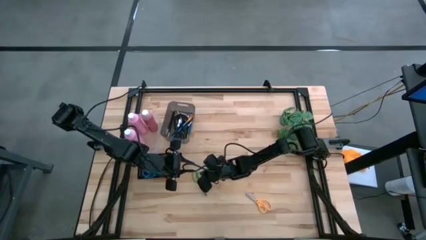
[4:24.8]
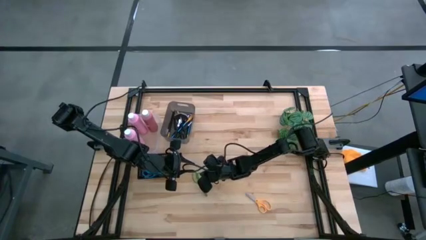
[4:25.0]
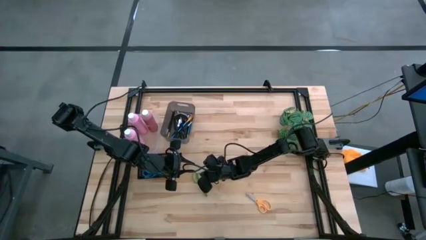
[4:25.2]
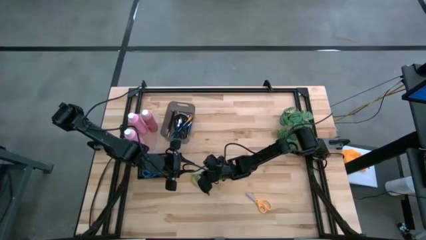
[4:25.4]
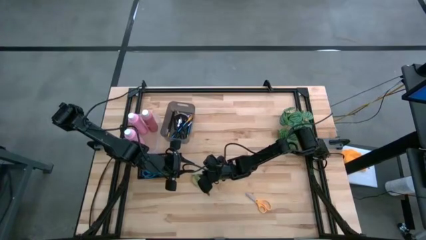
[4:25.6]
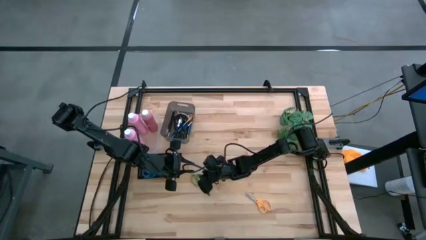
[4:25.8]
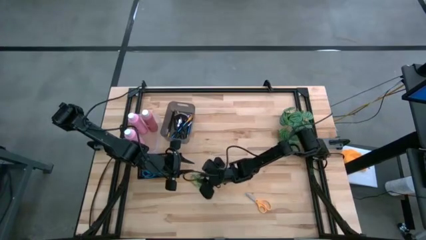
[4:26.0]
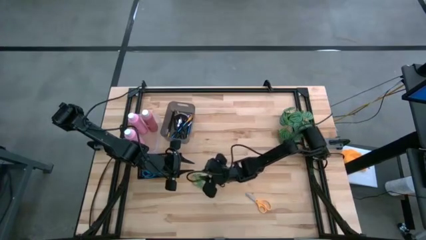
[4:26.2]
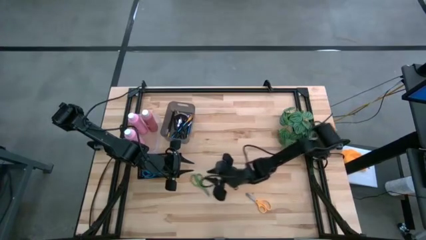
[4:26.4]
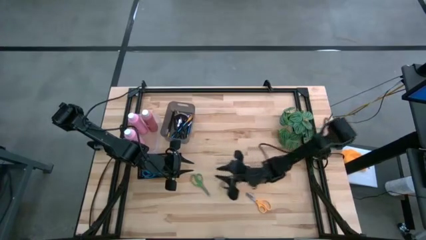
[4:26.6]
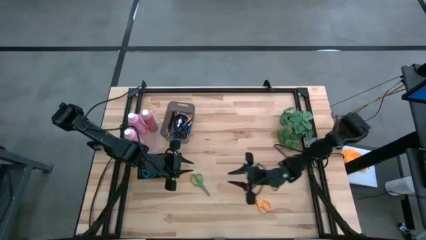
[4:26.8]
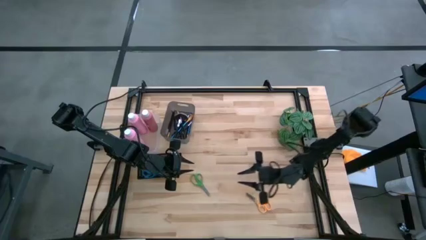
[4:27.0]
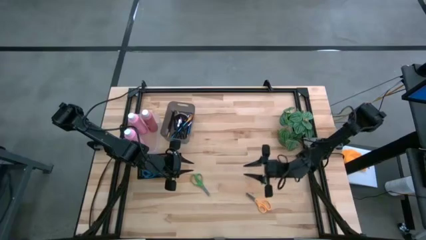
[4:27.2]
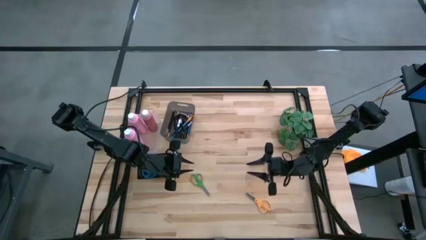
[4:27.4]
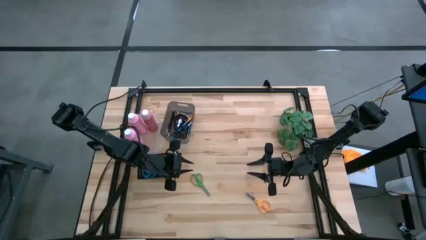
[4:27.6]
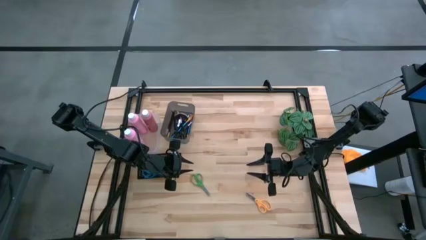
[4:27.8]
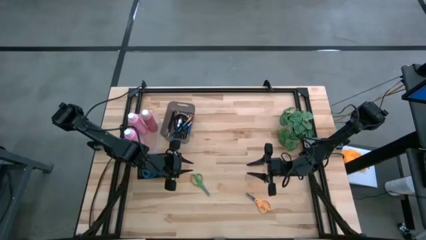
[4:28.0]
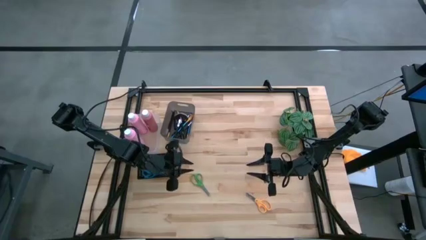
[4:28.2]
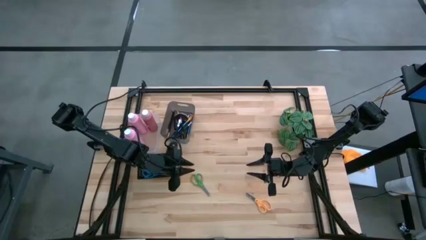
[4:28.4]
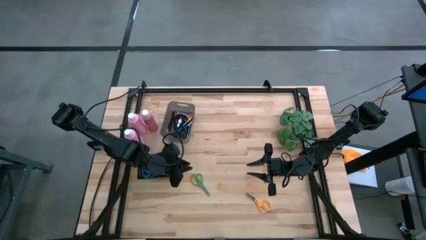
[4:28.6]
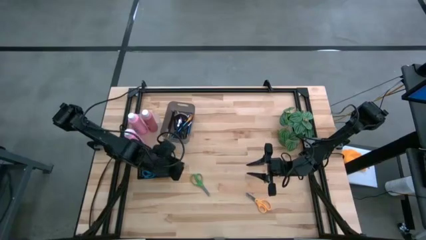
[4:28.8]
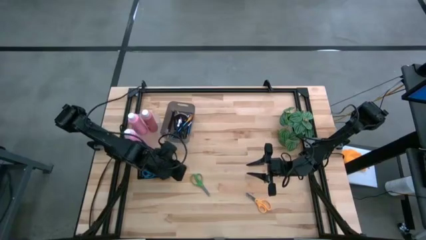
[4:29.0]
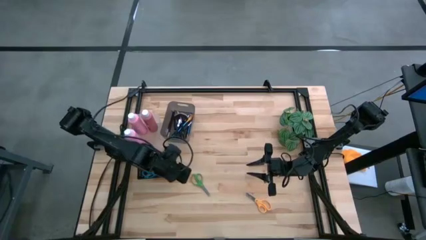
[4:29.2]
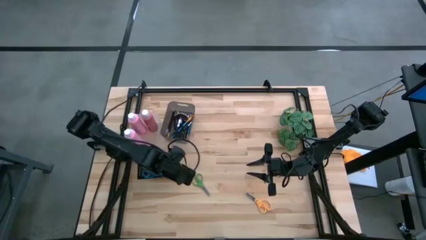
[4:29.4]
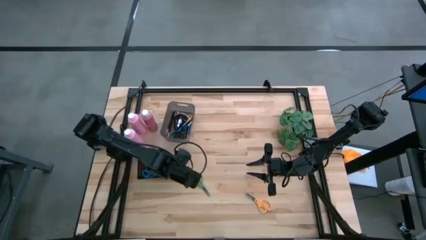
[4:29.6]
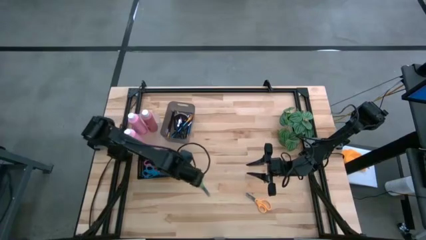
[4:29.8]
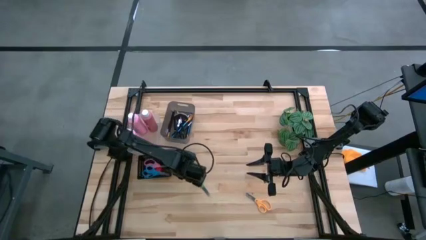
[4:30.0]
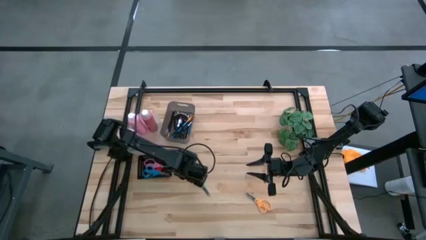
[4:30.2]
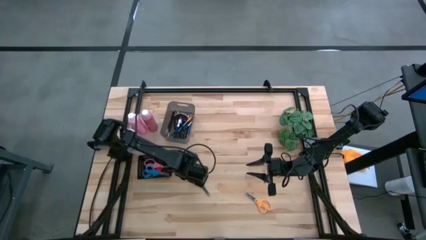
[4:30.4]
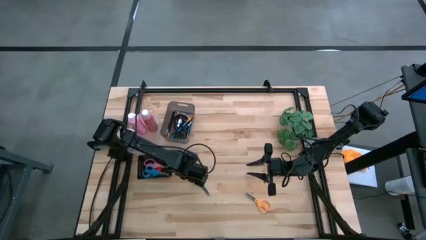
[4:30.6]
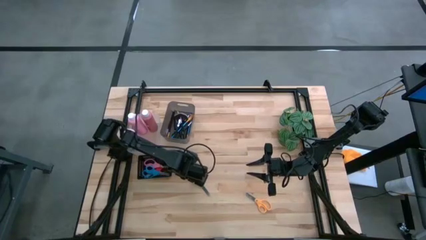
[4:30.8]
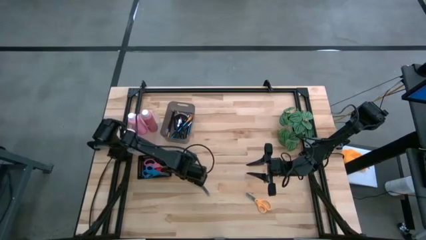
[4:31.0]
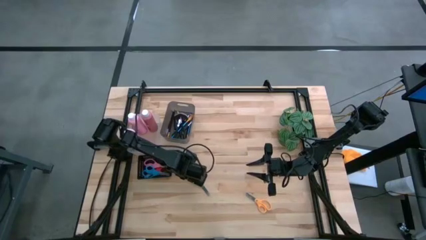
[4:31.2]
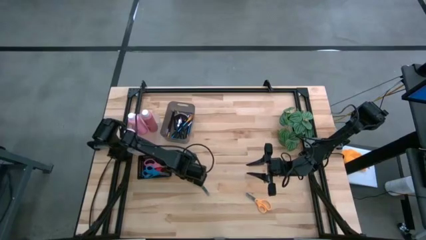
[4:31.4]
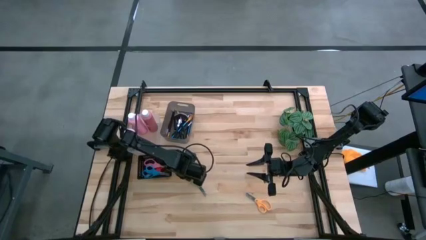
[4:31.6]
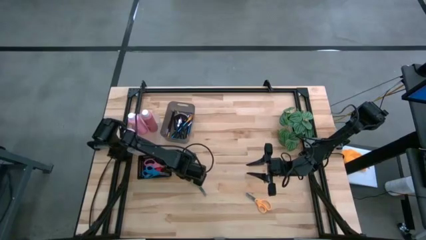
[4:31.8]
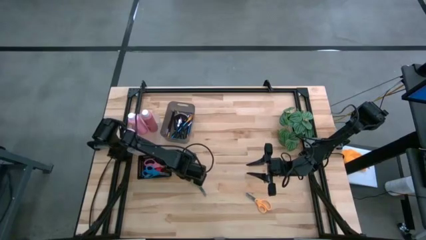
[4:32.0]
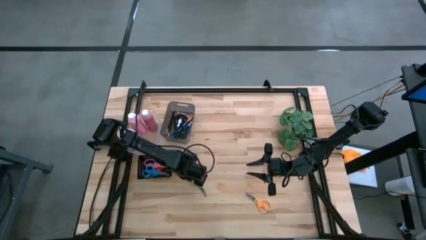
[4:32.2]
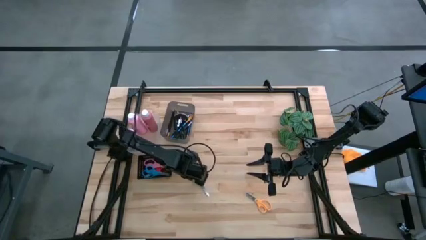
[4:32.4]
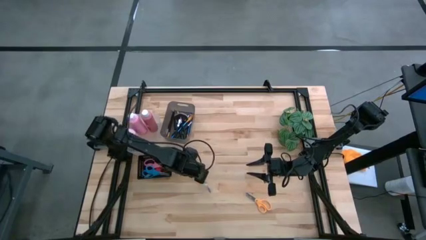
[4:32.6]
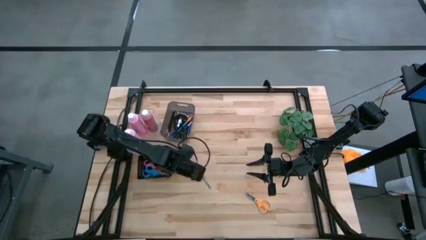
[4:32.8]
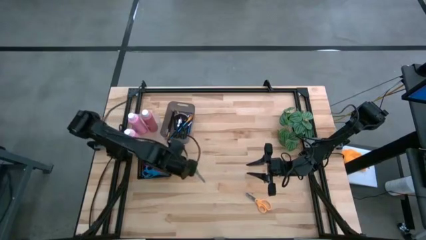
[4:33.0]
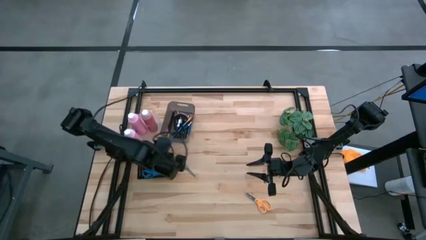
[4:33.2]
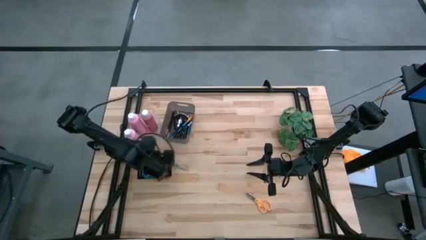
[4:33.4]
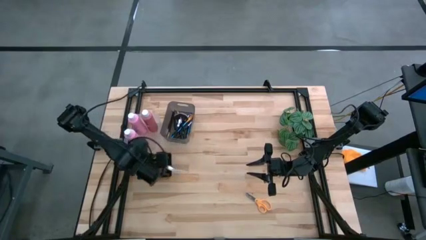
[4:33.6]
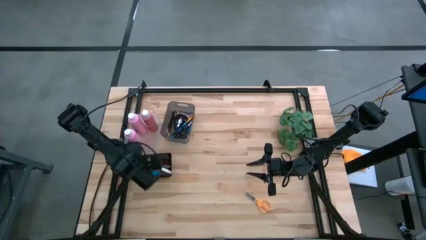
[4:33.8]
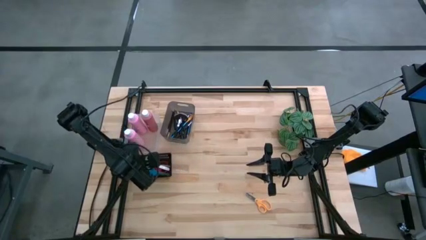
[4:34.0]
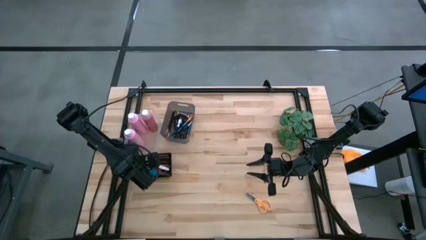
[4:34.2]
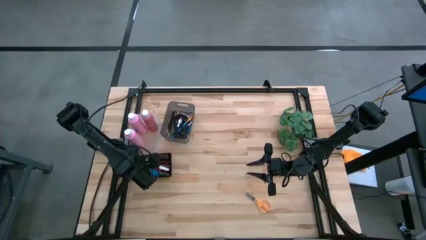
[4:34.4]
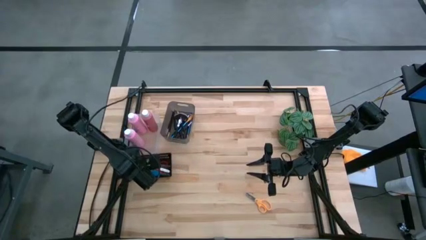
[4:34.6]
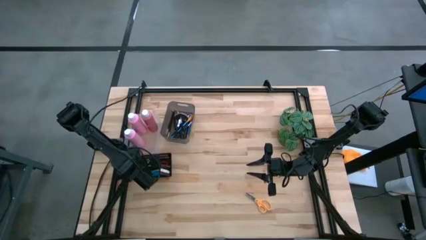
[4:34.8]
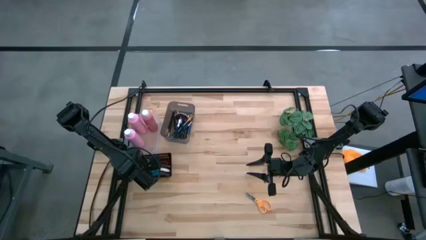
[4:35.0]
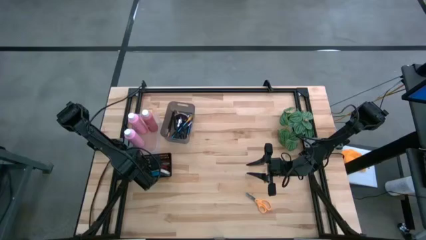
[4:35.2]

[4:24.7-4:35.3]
Task: Pick & Place Paint Supplies
Put the green scissors into the black basket
